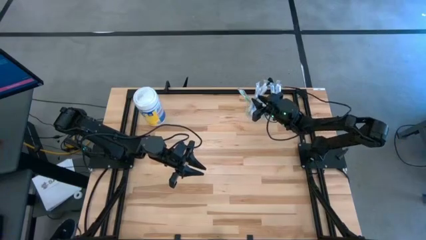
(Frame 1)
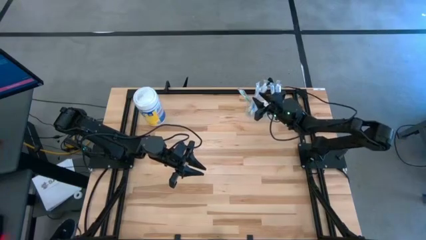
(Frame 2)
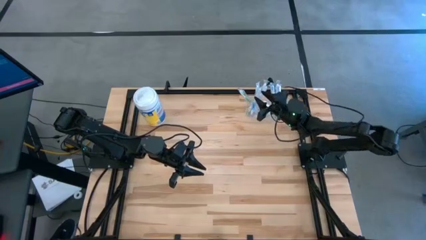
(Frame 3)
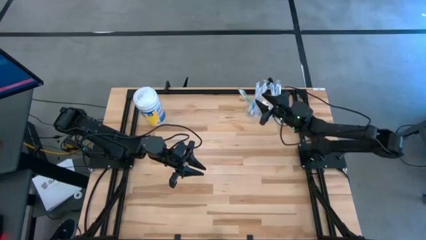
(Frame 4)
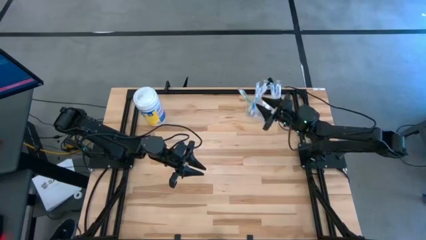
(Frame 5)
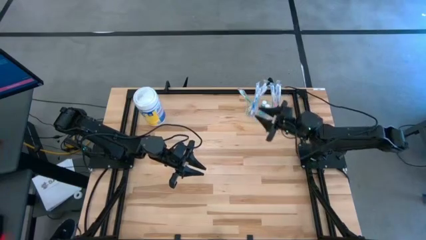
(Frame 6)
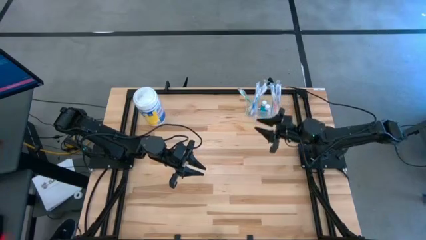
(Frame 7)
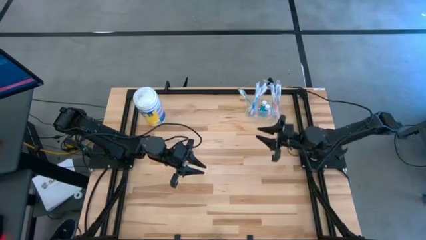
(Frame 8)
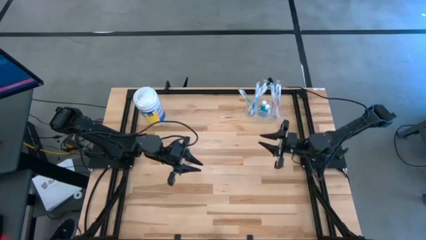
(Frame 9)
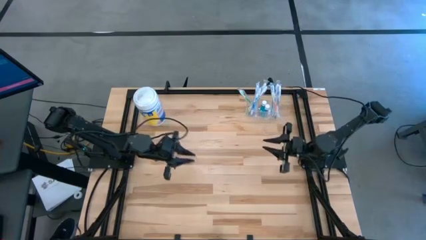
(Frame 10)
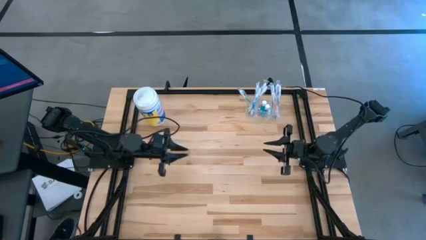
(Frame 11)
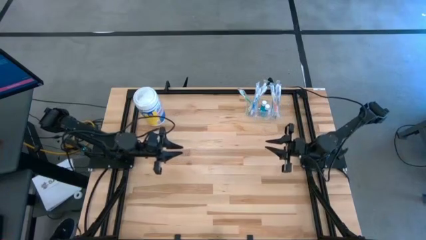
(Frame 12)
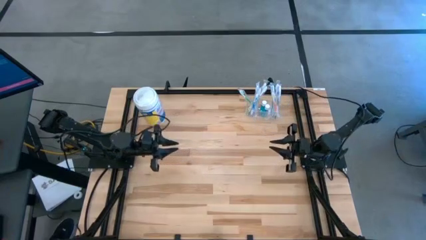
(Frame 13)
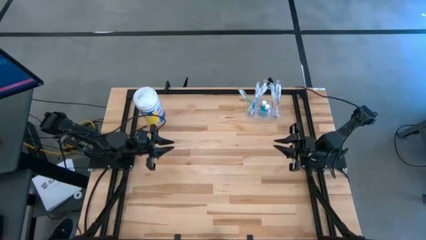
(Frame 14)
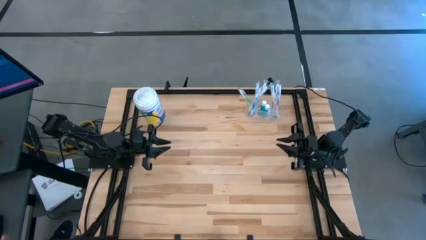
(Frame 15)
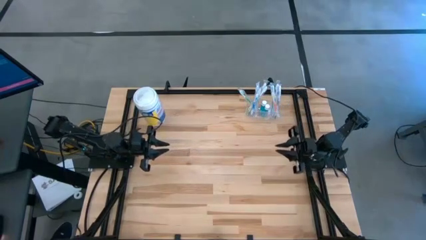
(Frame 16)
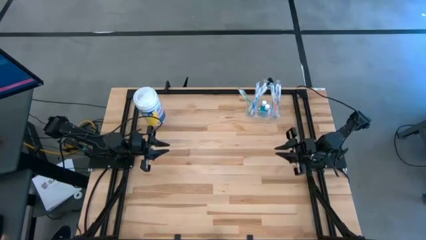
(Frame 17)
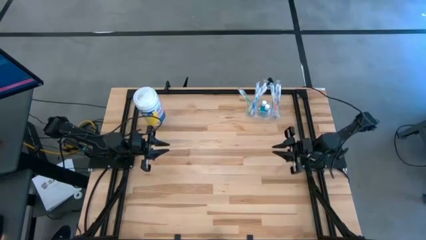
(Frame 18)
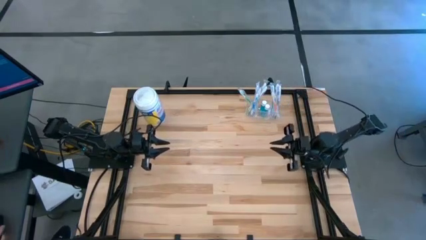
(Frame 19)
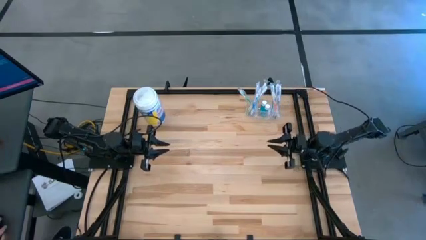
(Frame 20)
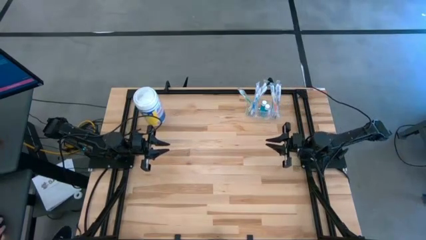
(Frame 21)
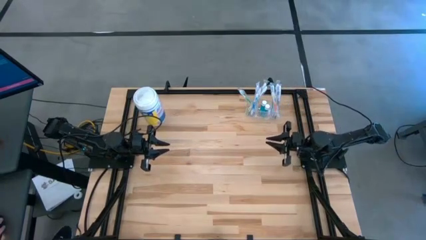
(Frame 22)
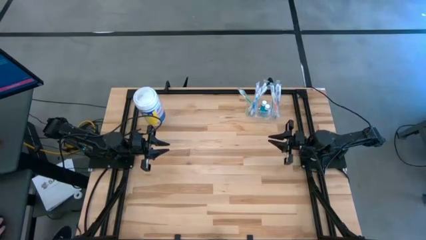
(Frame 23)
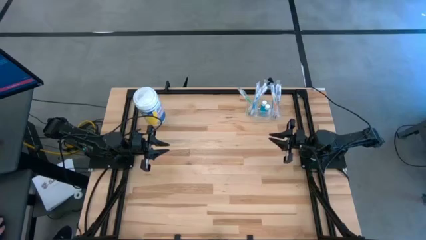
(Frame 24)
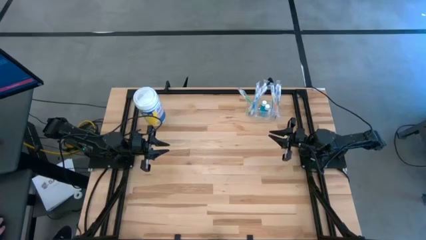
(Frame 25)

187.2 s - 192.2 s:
Task: Pick & Place toothbrushing station
Return to Home Position

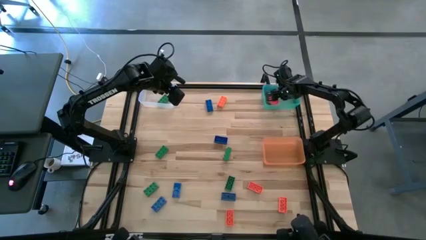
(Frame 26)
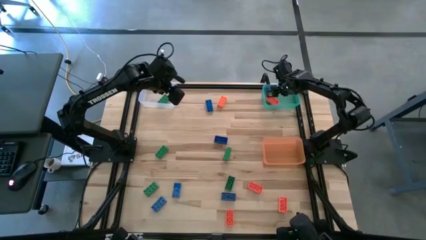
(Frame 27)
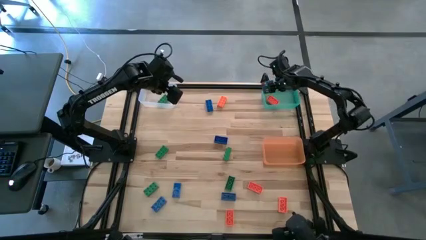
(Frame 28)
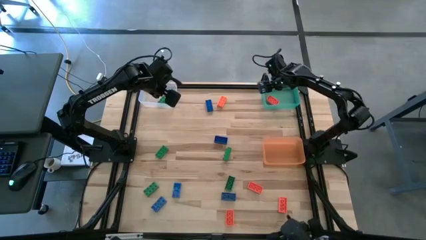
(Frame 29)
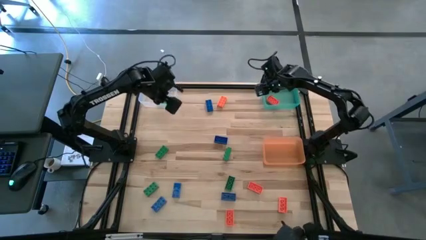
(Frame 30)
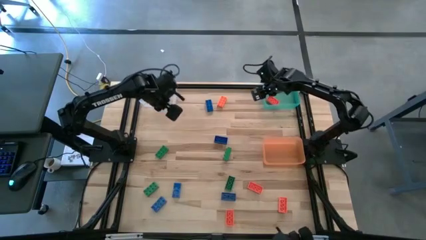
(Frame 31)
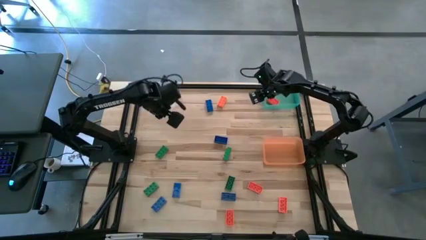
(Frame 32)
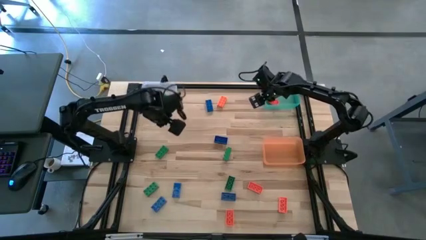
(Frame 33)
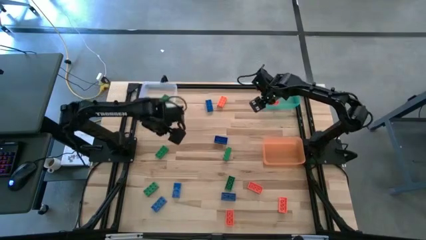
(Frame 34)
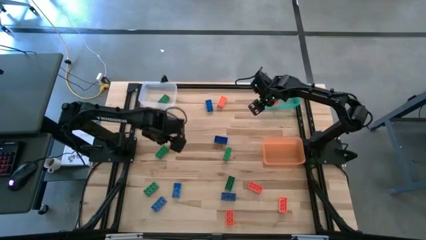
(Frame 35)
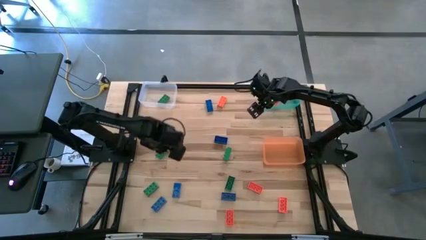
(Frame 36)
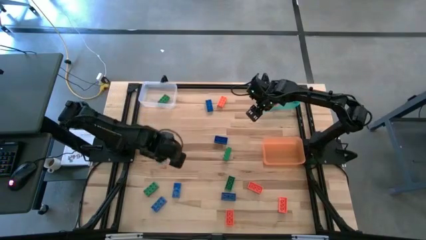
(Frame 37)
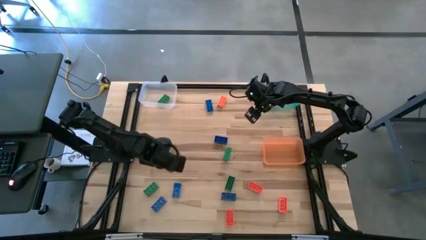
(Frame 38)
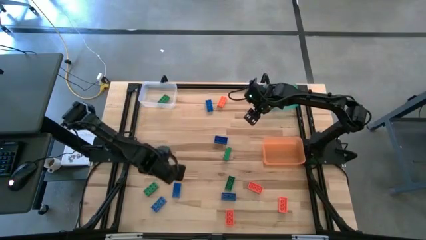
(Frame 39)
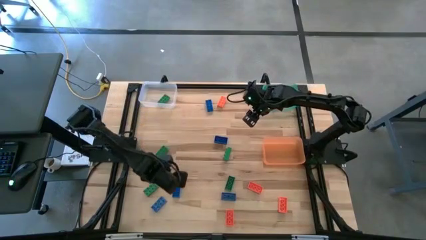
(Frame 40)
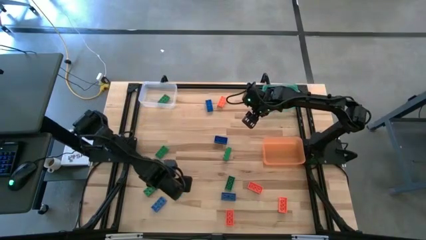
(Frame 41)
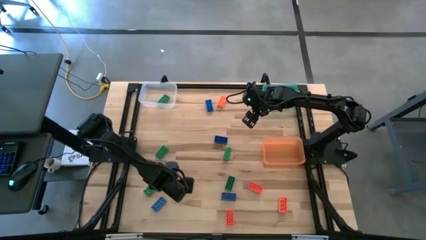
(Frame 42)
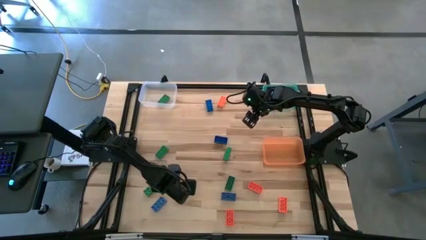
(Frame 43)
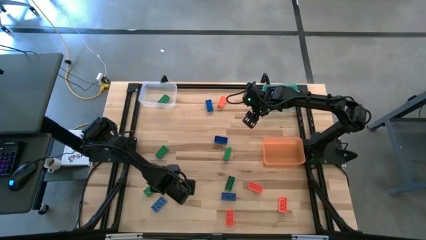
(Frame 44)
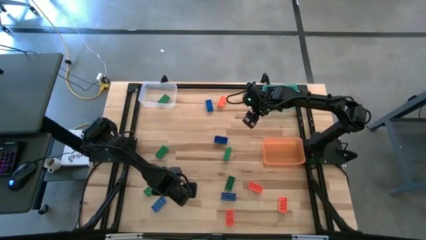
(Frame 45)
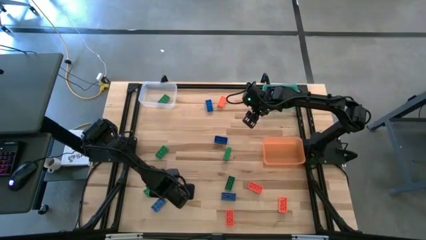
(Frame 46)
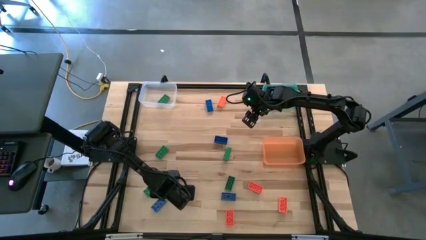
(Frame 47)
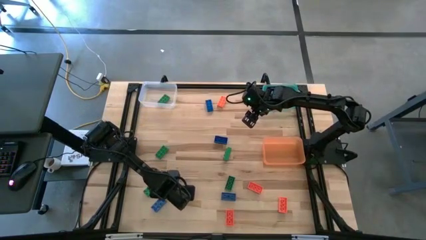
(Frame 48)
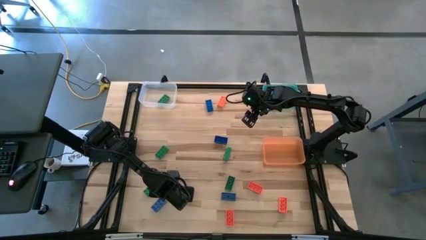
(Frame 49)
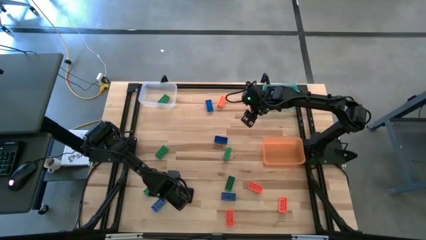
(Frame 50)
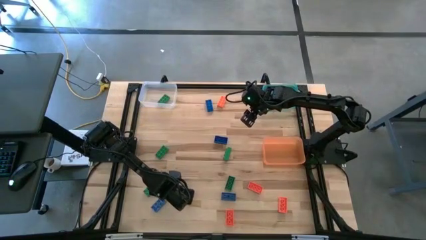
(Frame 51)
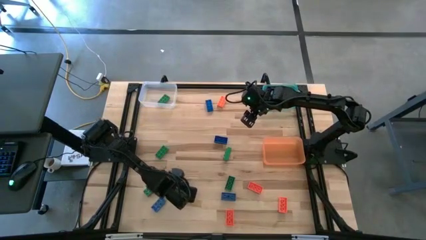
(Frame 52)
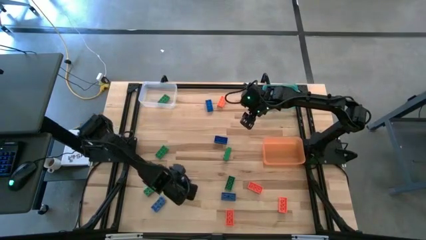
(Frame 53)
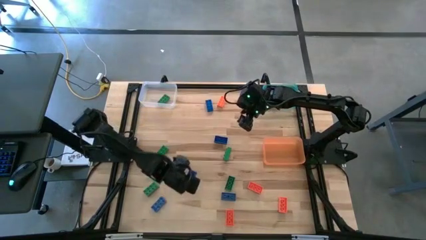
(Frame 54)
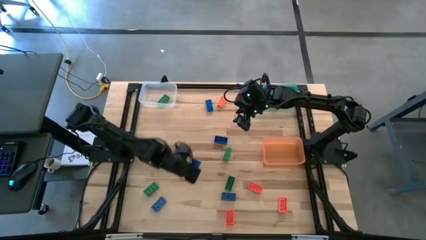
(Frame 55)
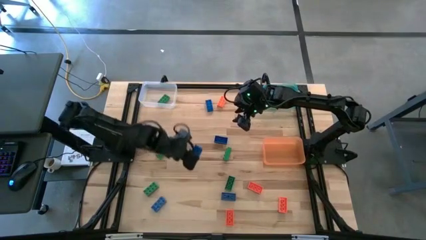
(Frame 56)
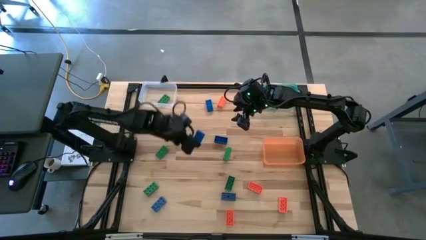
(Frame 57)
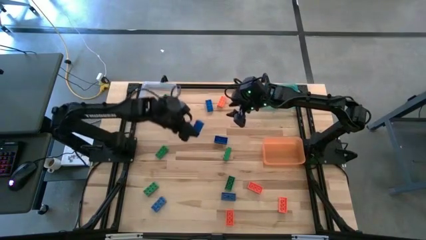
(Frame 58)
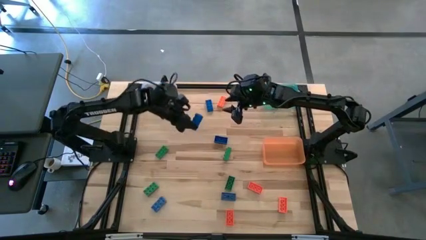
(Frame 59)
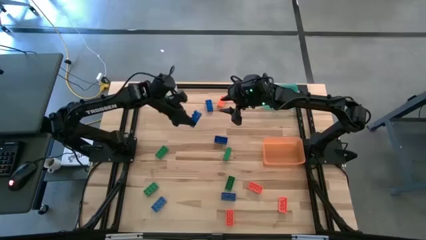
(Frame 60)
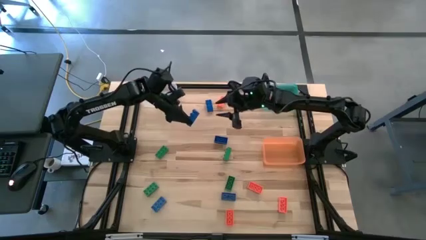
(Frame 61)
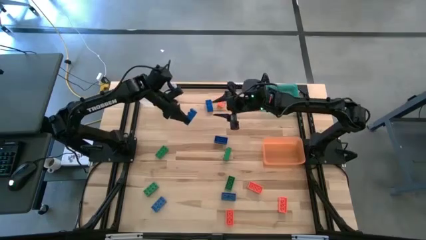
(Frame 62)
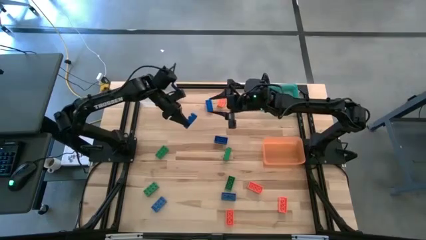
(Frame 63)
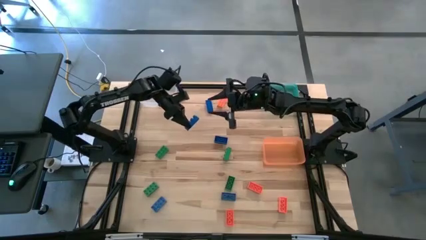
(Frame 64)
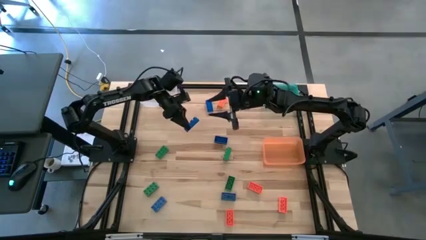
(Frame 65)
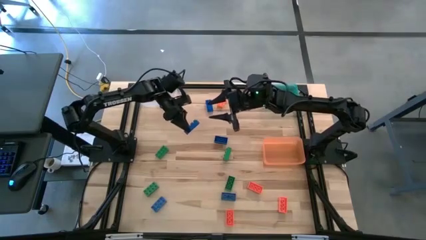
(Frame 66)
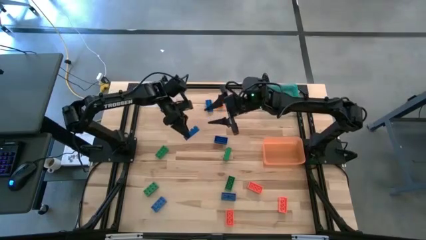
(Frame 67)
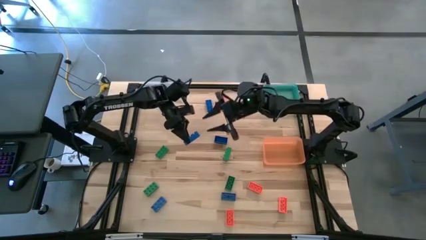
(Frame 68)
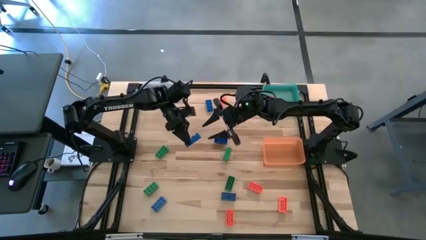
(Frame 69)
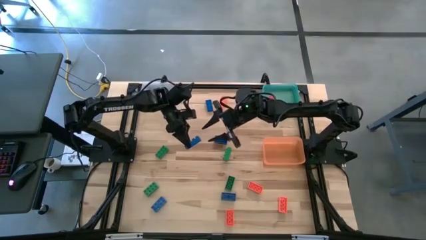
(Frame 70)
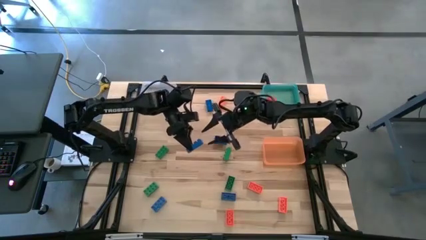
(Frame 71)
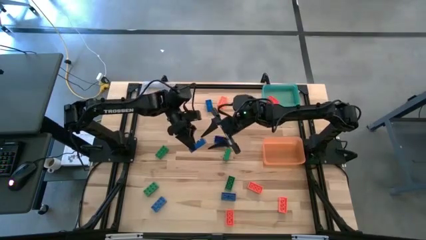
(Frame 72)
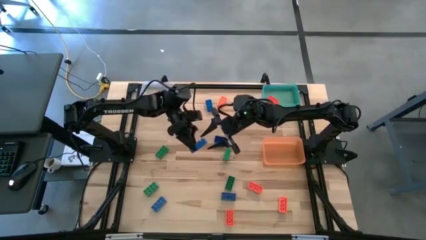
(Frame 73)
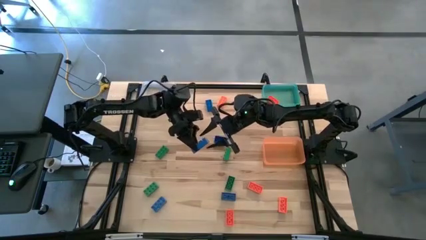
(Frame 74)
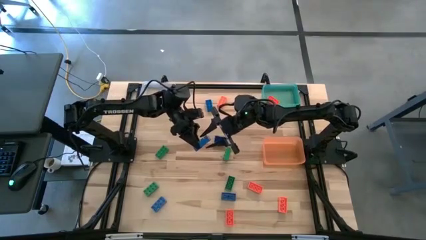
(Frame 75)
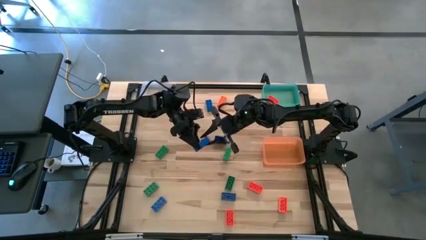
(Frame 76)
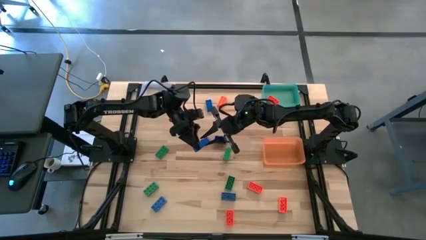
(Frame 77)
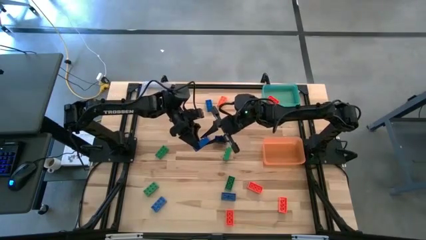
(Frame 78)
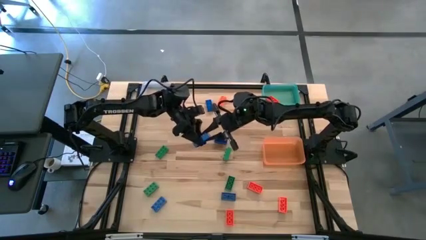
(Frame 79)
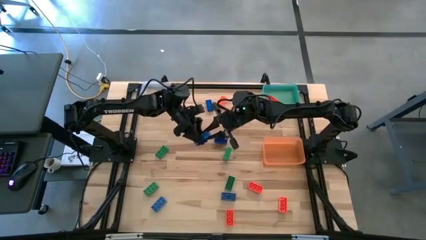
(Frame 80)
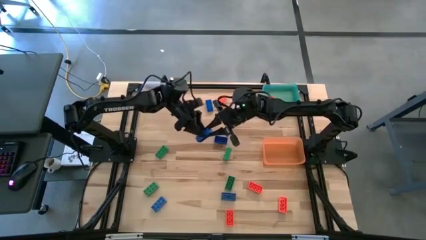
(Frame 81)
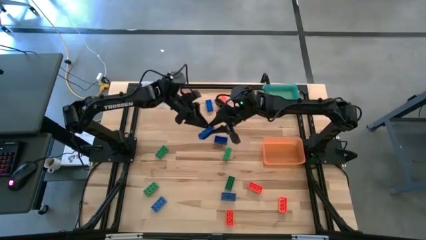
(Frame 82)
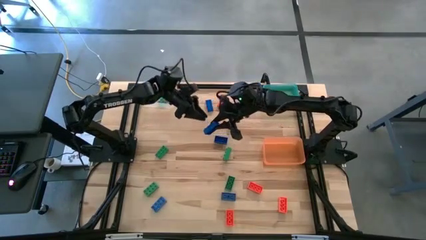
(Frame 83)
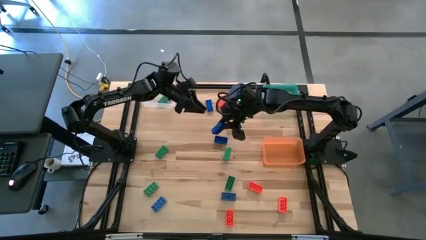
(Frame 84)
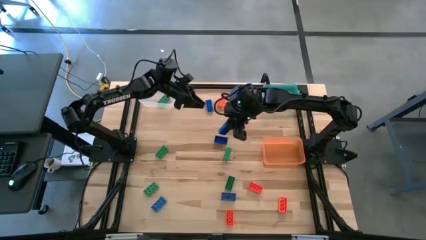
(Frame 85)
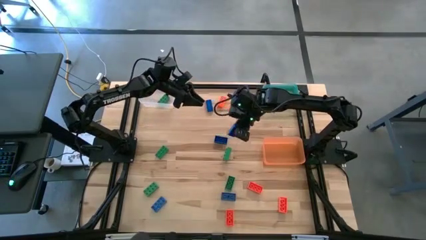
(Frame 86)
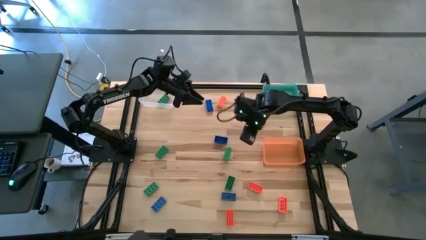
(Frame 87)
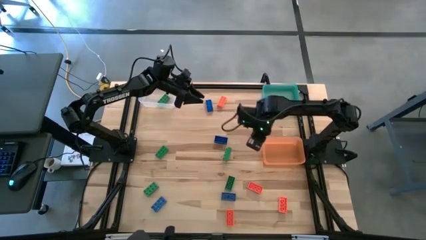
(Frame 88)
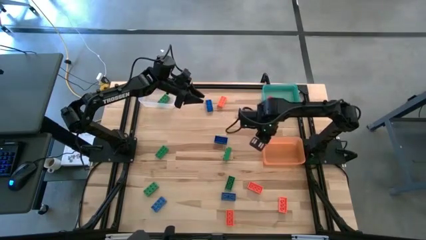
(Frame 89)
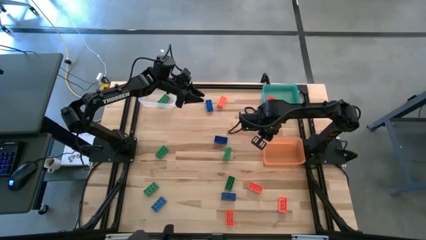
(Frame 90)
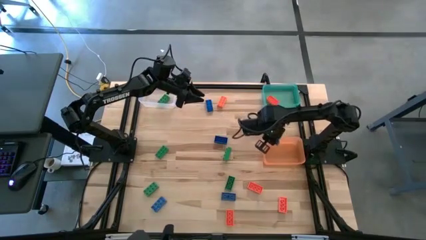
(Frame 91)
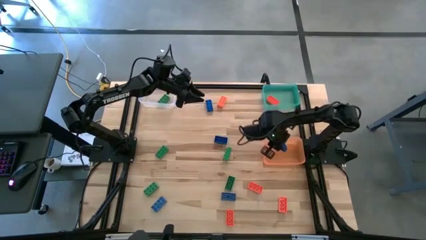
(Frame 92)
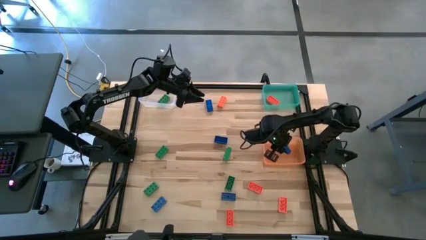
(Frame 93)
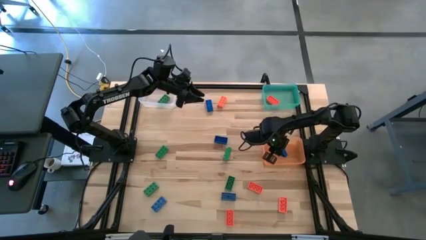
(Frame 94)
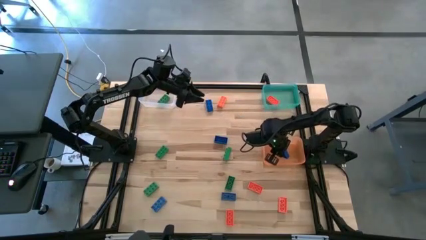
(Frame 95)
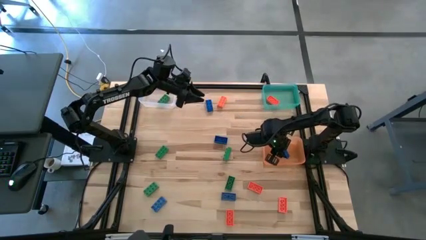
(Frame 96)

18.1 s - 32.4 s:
Task: Sort & place blocks by color
Put the blue game piece into the orange bin
